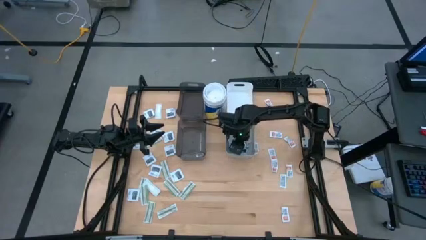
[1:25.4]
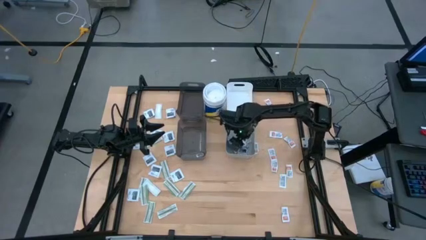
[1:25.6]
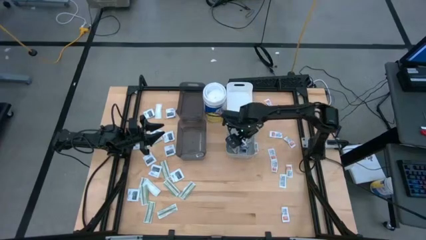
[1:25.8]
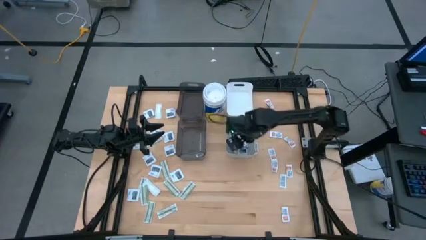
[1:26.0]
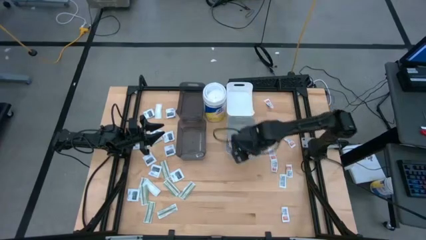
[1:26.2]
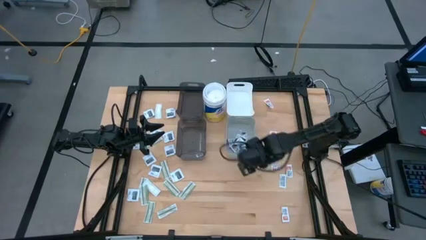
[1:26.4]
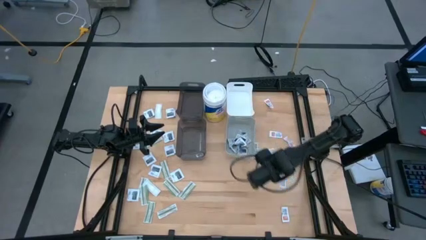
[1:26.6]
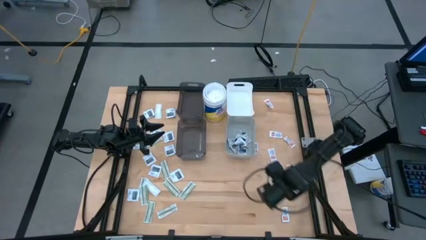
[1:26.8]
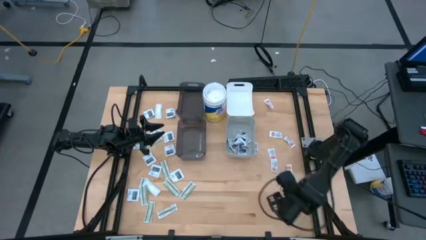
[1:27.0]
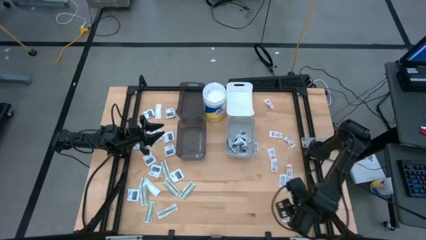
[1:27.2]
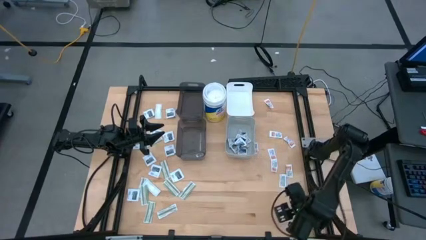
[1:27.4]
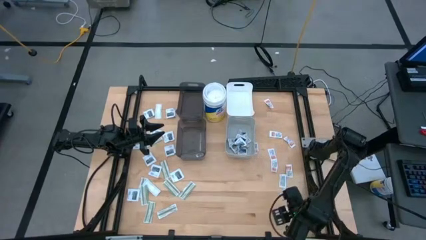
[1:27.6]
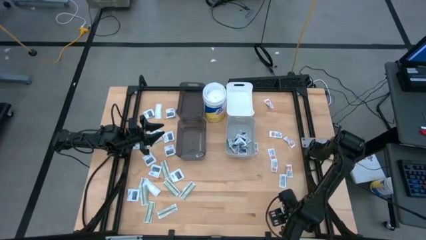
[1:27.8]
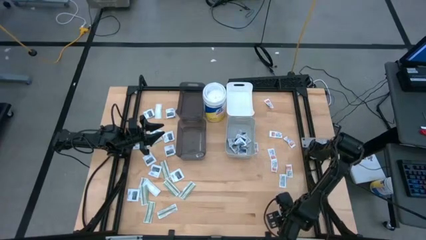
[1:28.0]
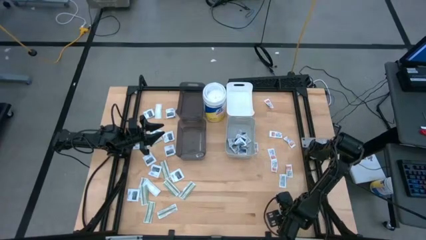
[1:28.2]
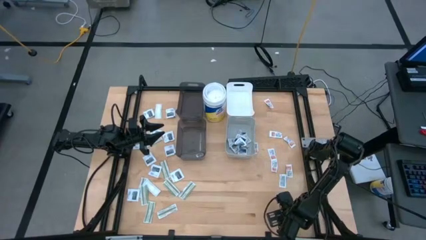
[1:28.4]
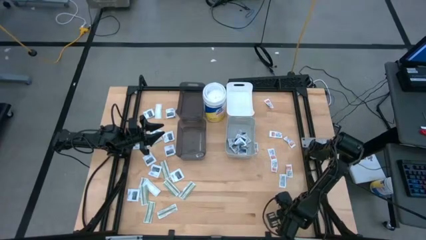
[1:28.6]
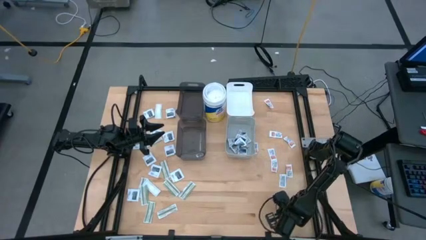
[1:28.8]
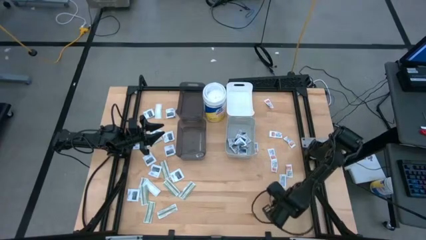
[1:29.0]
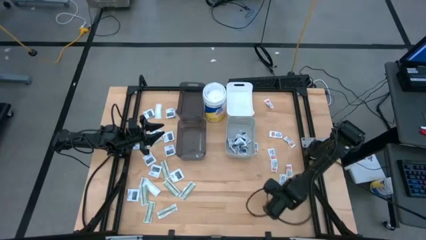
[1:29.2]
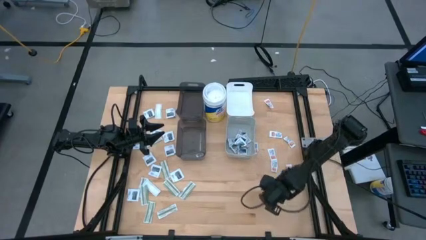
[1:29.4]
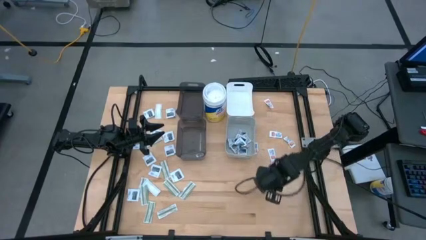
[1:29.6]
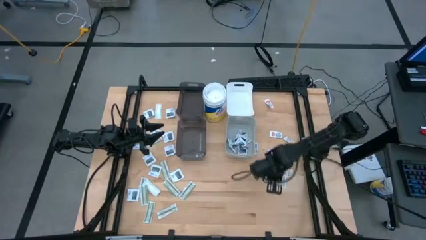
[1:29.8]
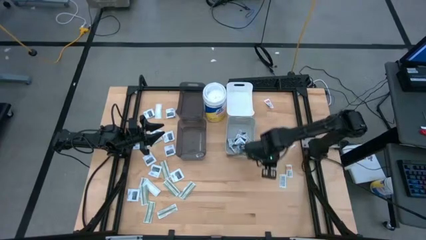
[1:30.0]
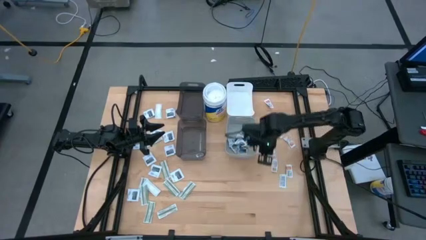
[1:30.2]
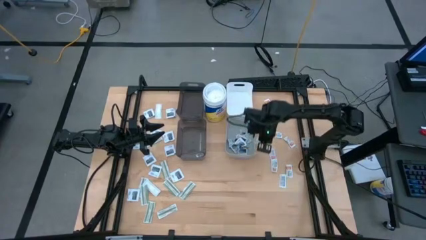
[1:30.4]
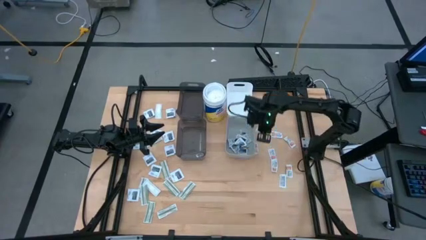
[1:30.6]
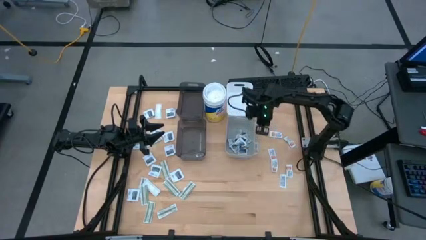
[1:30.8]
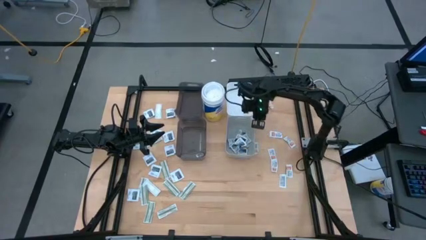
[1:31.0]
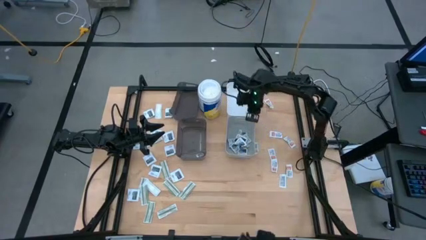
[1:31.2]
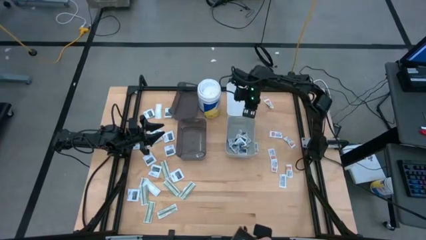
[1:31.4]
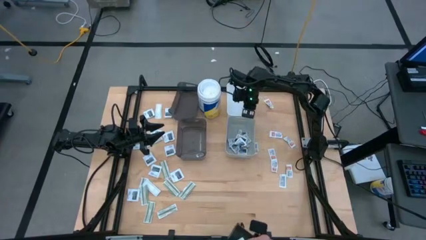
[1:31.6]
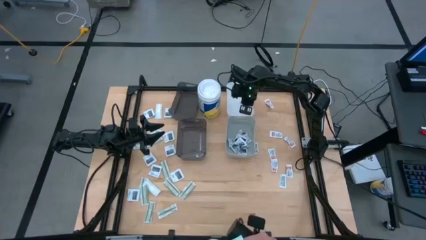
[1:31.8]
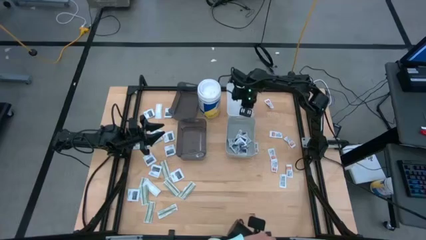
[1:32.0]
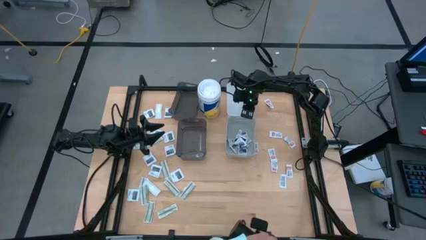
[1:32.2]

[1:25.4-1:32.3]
Task: Pick & Place First Aid Supplies
Put the ointment pack into the white bin

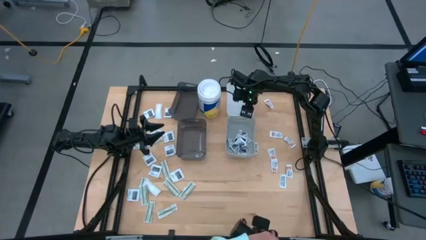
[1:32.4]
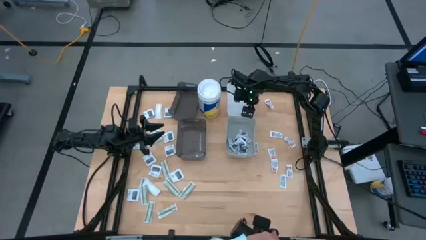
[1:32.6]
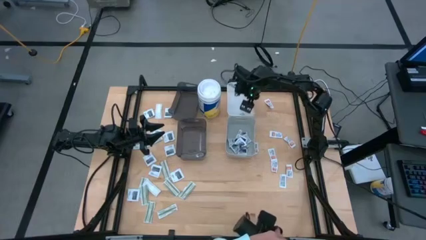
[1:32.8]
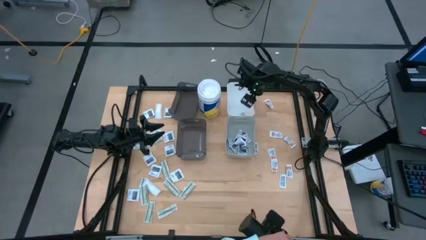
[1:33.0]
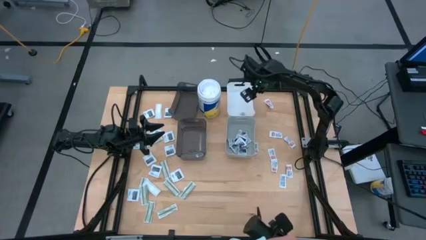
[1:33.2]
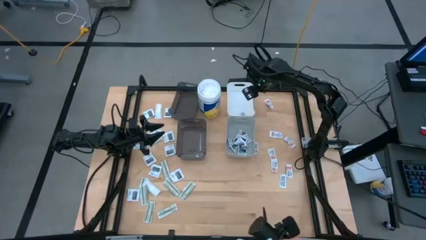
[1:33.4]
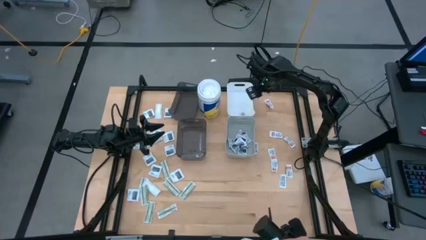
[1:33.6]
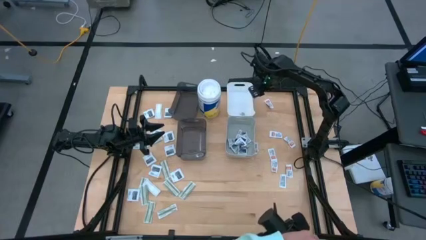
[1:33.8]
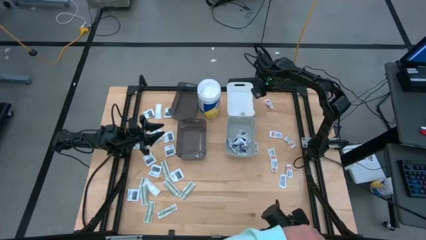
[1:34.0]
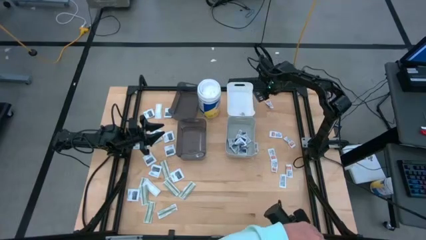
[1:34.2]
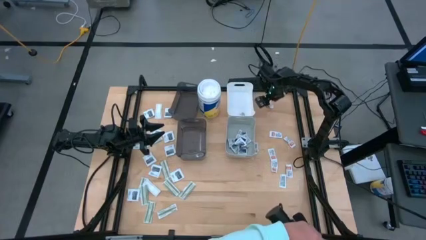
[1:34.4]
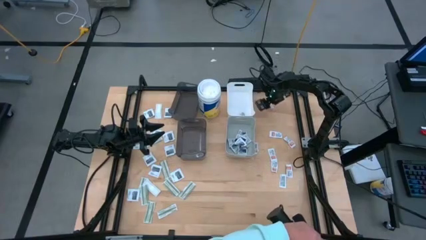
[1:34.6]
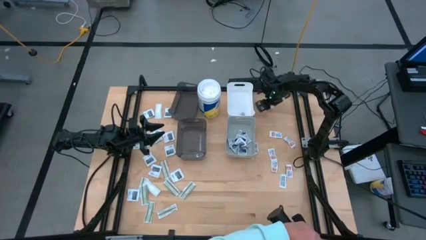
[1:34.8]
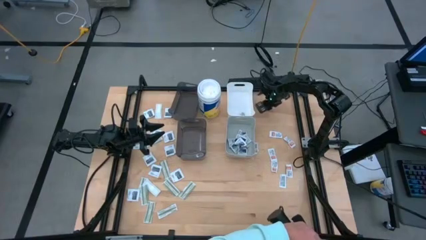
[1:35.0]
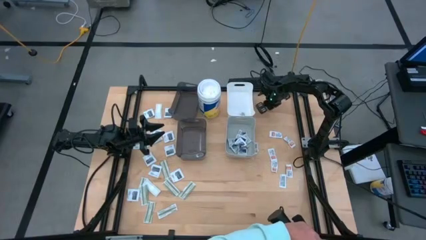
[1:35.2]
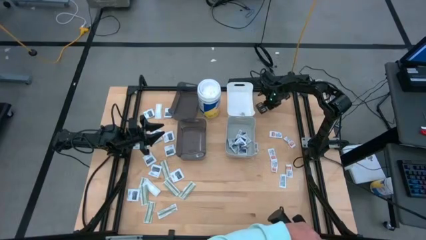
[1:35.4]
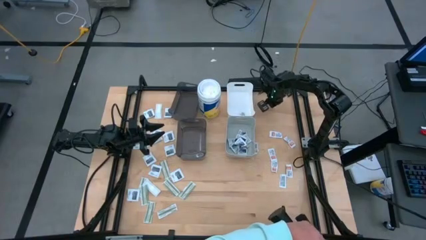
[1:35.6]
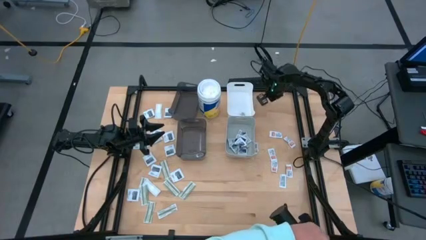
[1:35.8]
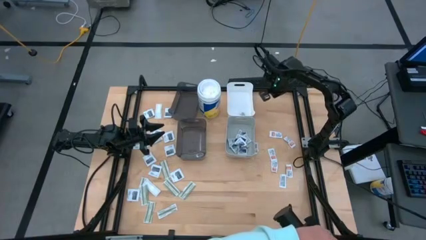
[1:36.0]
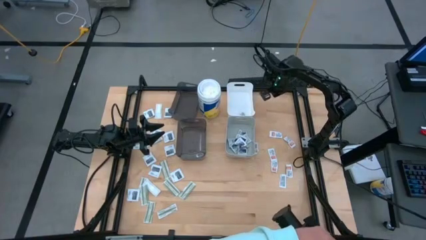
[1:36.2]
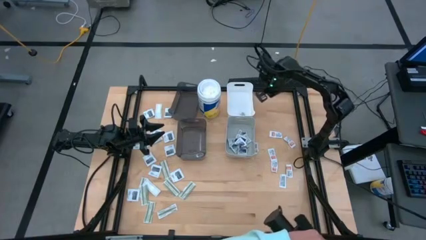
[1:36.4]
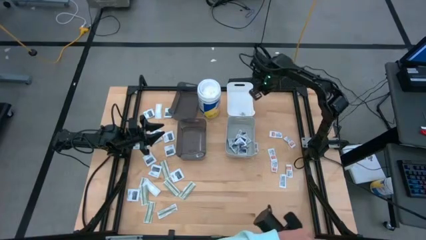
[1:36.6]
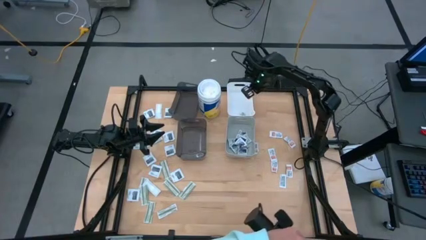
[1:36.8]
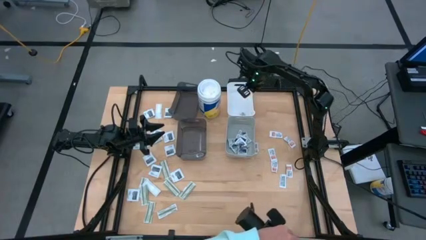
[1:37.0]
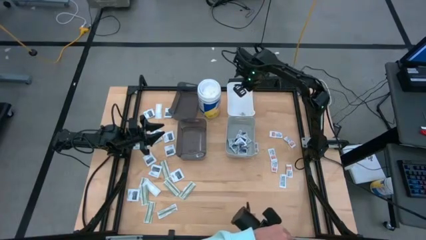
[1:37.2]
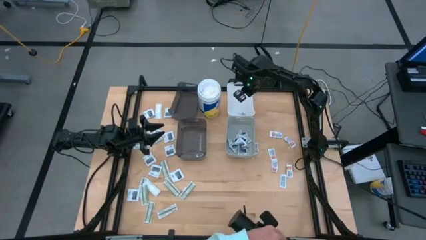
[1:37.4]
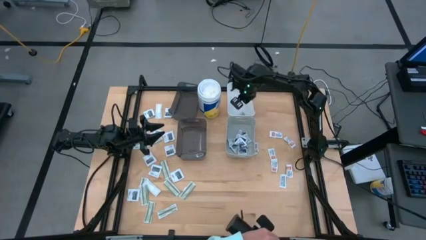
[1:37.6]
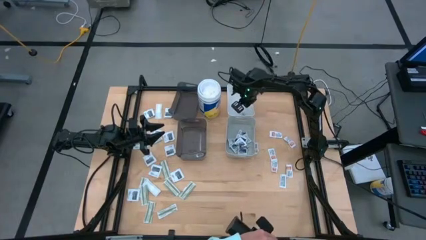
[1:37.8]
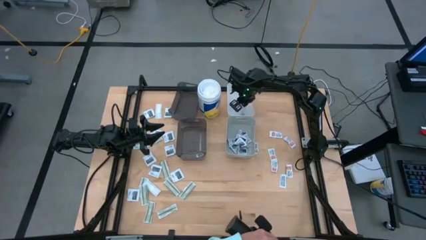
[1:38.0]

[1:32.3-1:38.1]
Put the ointment pack into the white bin

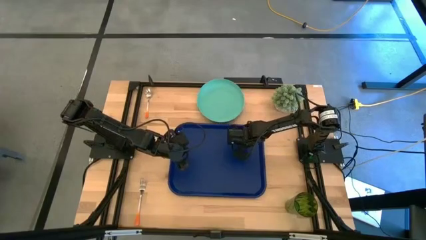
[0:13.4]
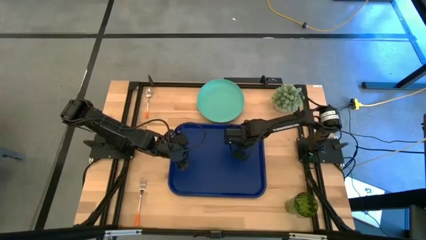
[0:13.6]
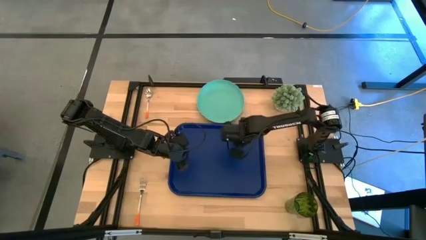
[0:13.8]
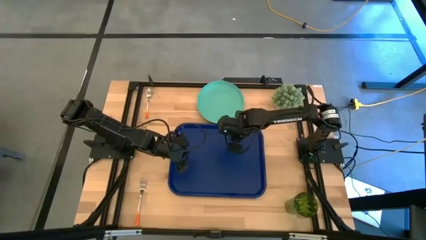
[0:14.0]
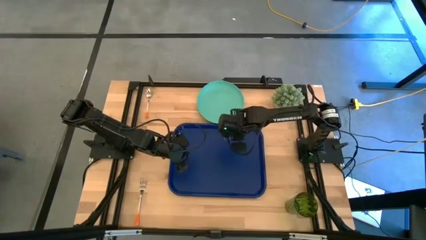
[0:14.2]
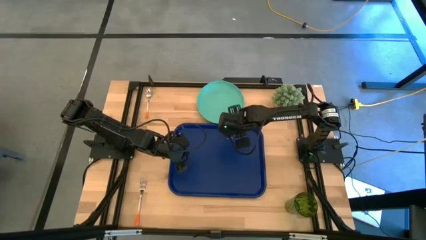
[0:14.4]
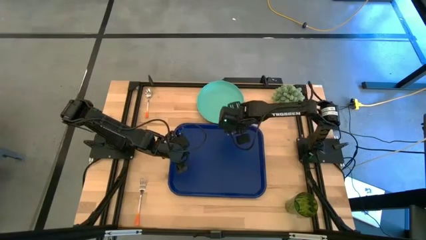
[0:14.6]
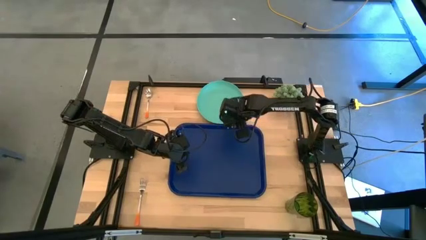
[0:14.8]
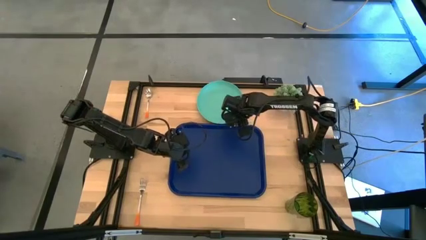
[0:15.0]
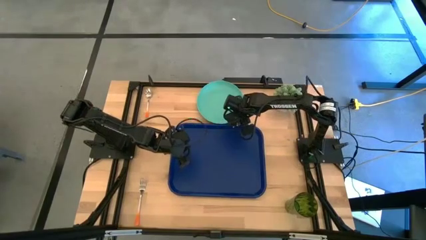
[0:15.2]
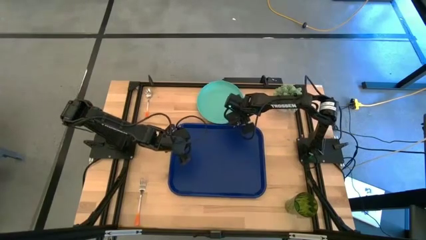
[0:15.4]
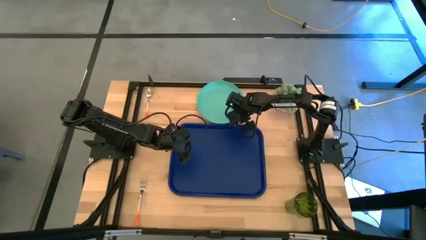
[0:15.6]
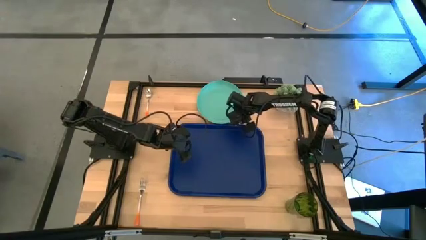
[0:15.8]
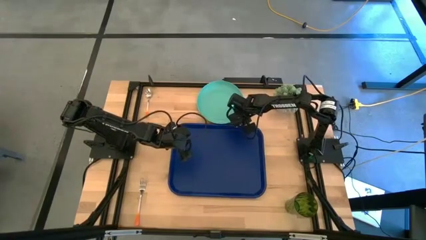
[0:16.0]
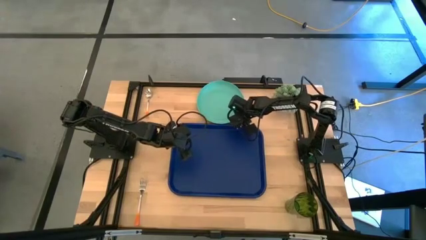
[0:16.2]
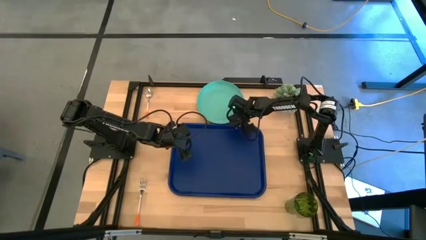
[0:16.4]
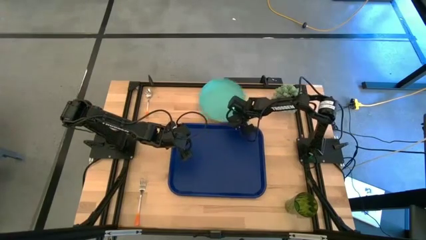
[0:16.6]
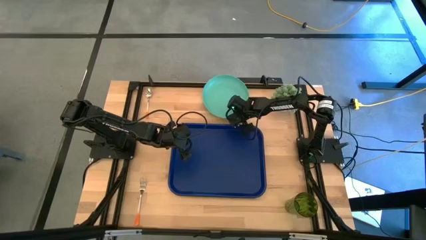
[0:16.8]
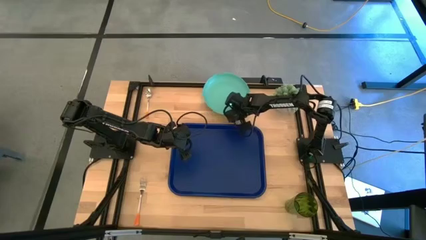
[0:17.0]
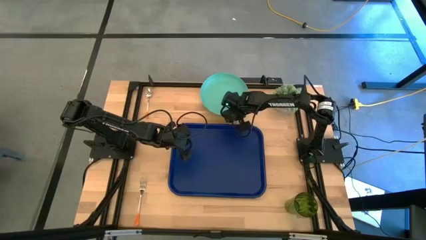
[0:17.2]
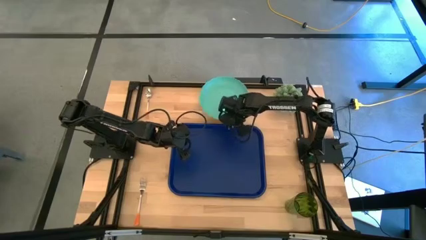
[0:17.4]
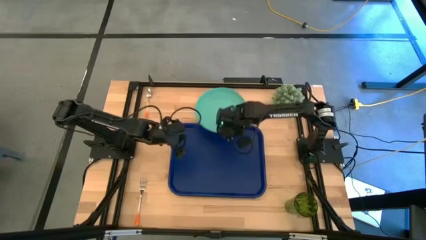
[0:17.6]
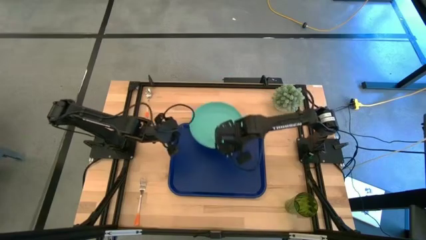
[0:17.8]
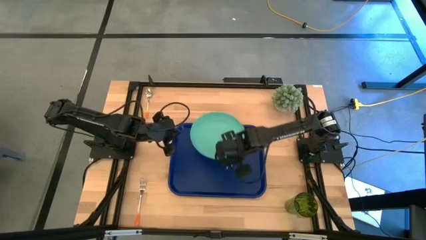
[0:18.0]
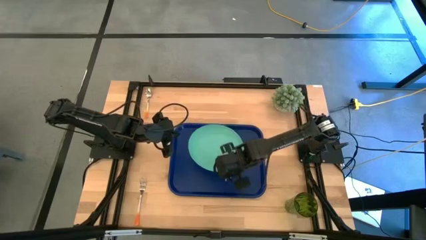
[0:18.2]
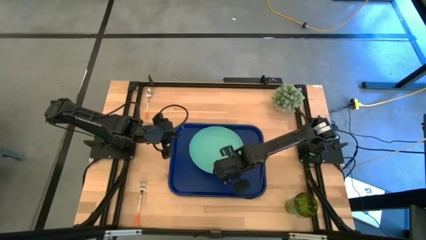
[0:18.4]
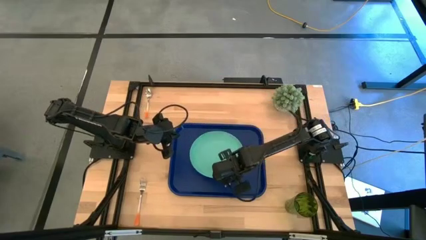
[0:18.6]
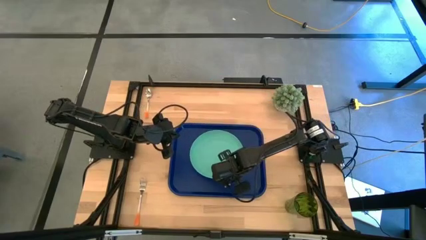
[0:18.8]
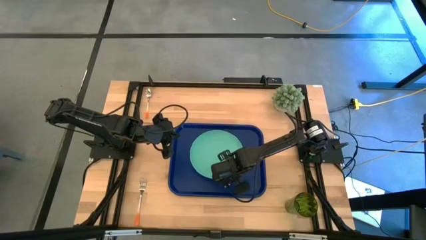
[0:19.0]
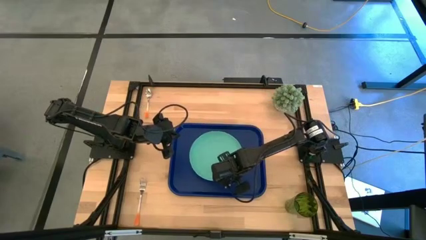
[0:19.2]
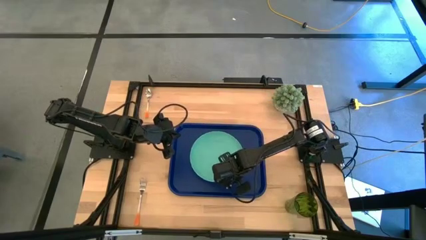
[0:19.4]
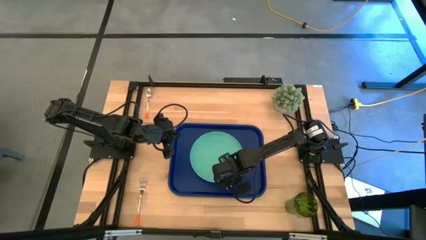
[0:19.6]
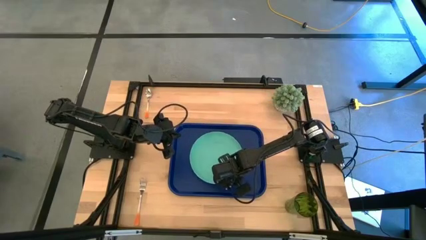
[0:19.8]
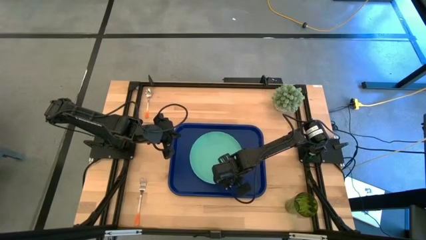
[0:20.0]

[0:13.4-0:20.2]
Task: Pick and place plate/cup/fork/spoon on tray
Put the green plate on the blue tray
